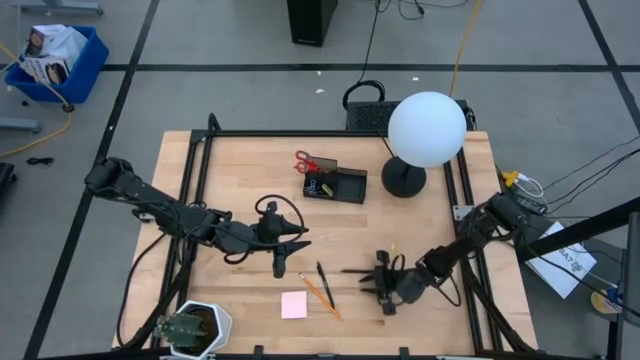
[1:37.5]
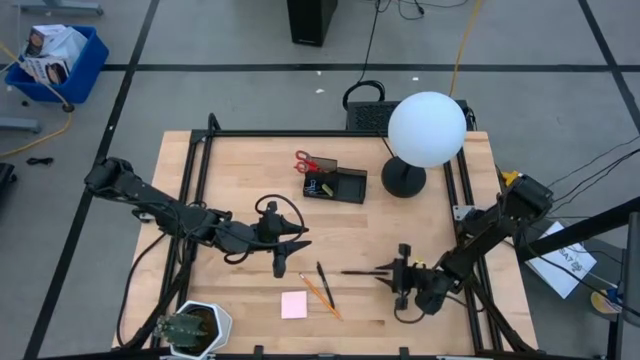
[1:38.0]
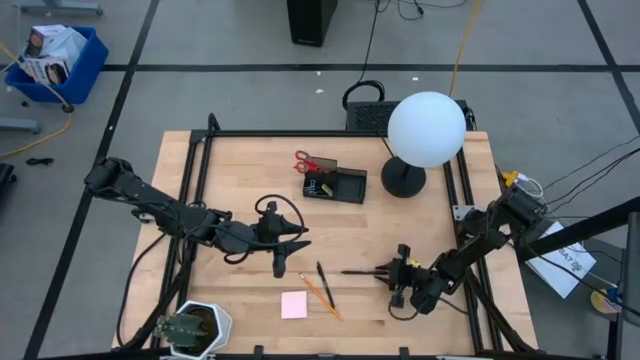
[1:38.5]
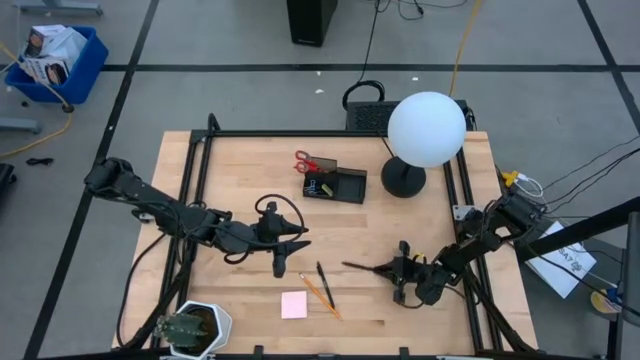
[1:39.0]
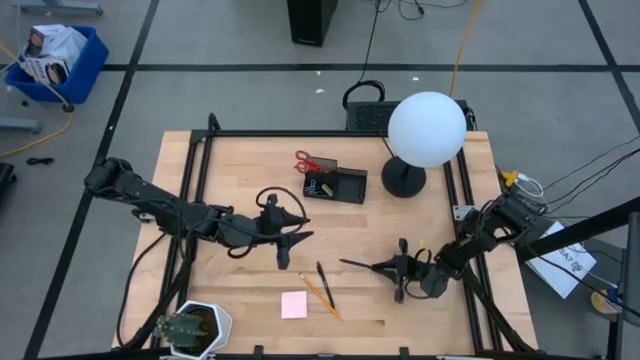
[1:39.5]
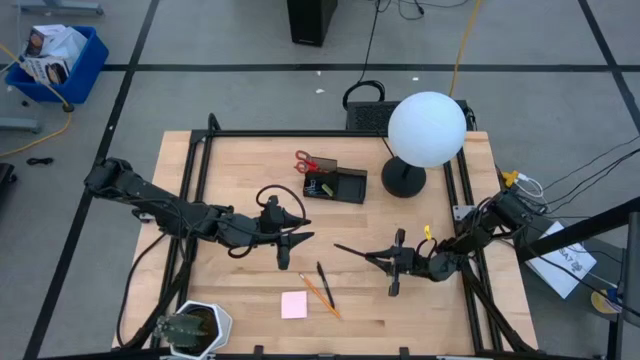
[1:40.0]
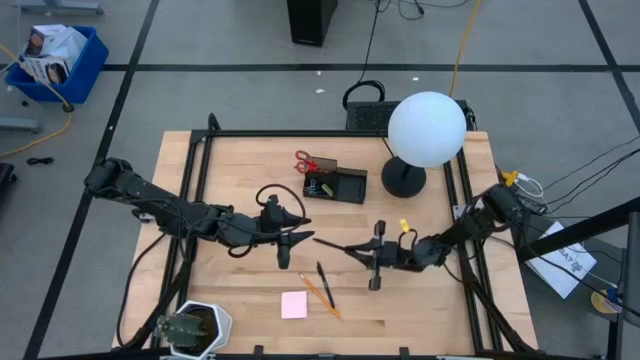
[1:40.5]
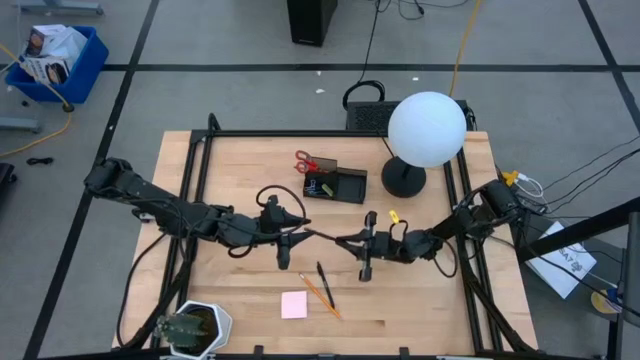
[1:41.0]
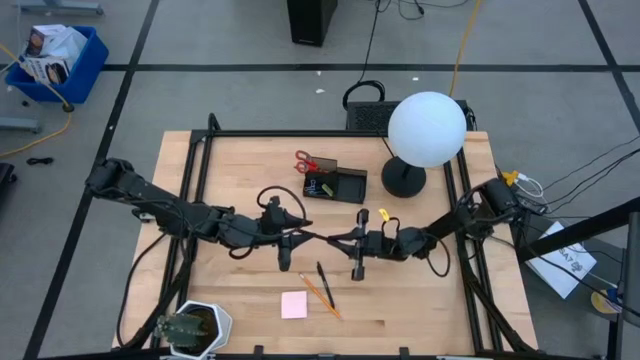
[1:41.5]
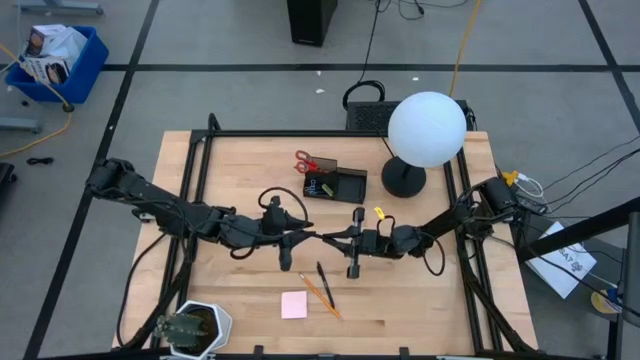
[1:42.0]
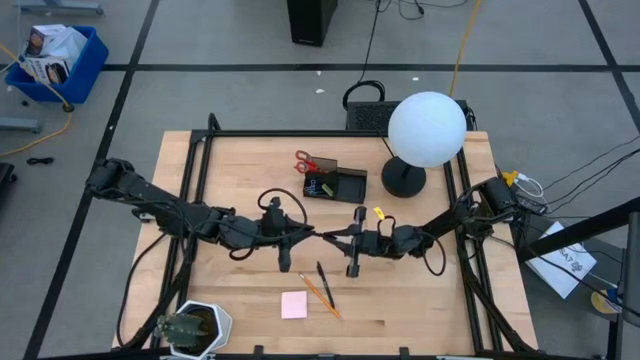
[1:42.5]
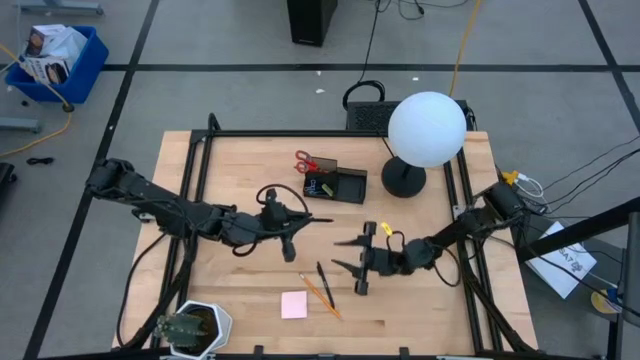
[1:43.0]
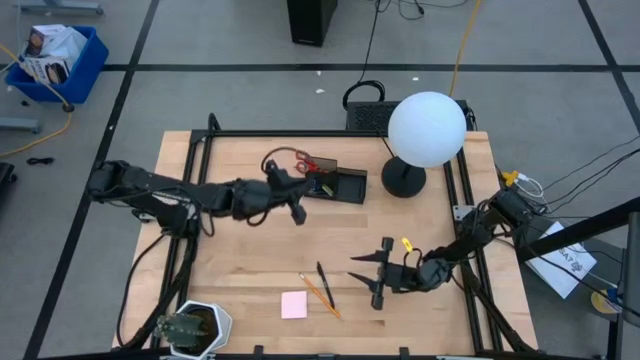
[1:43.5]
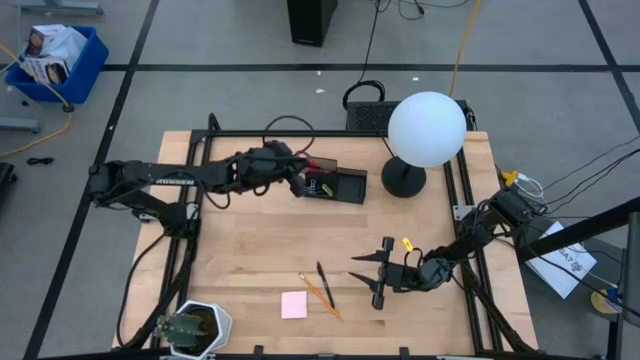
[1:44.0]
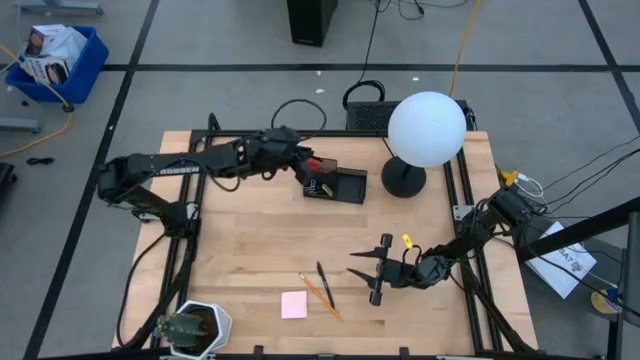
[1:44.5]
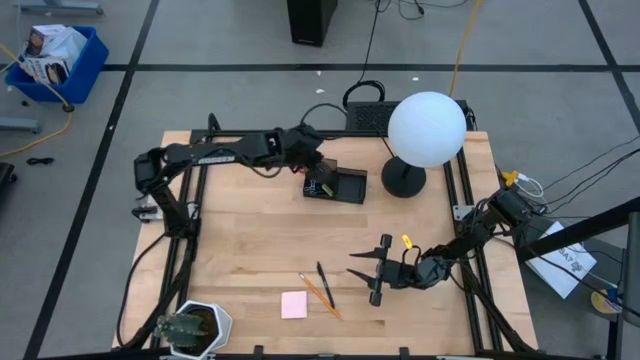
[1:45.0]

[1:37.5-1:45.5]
Task: Pick and place office supplies into organizer
Put the right black pen into the black desk organizer

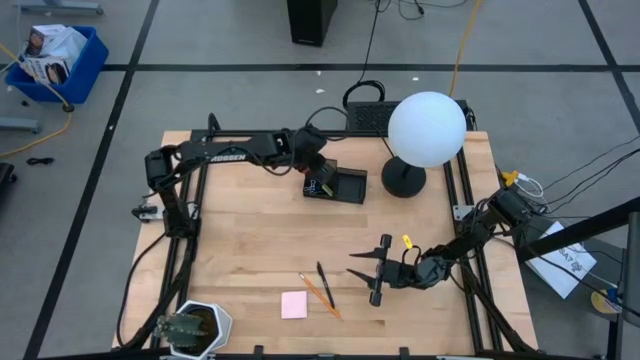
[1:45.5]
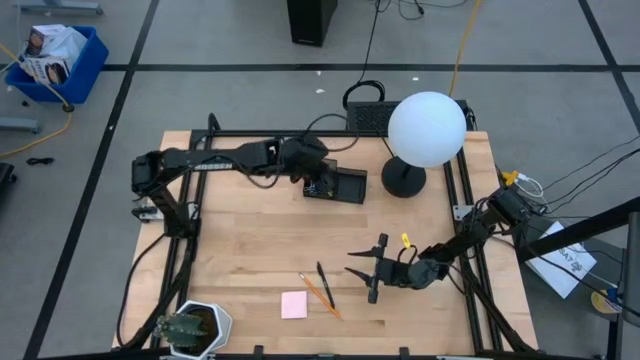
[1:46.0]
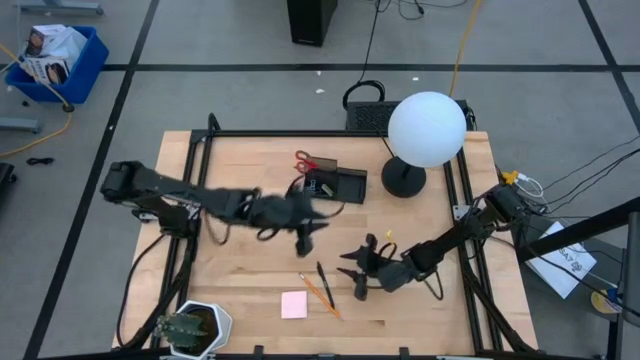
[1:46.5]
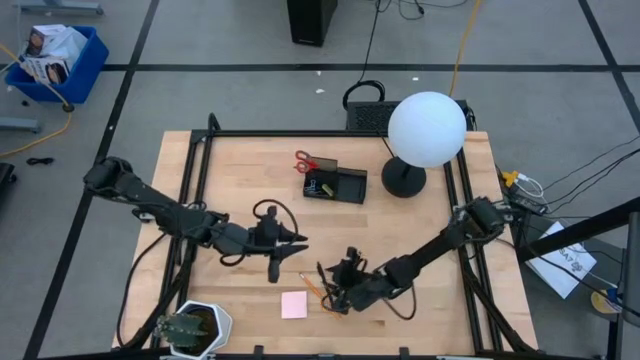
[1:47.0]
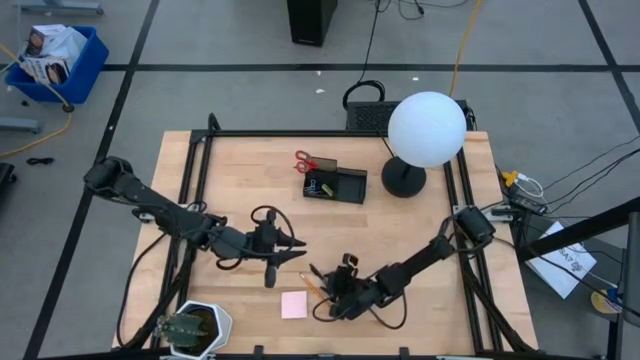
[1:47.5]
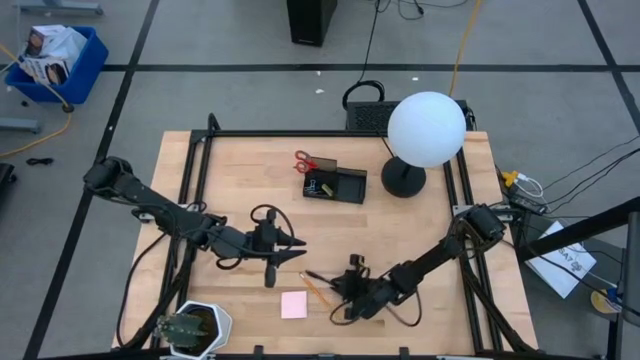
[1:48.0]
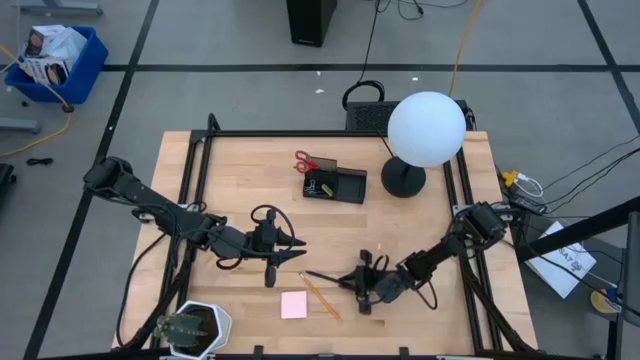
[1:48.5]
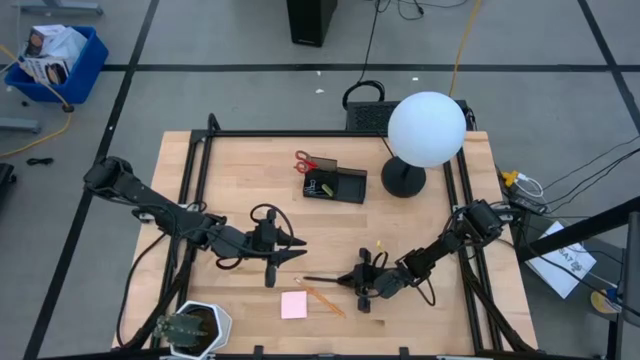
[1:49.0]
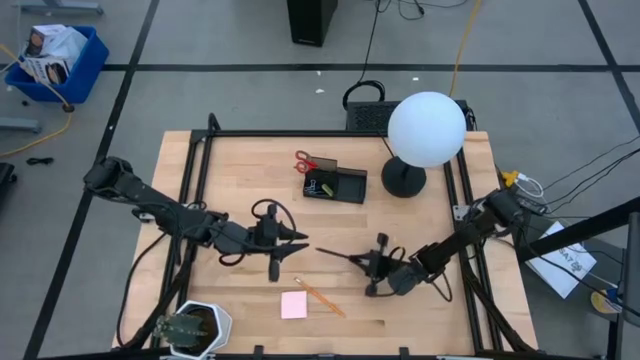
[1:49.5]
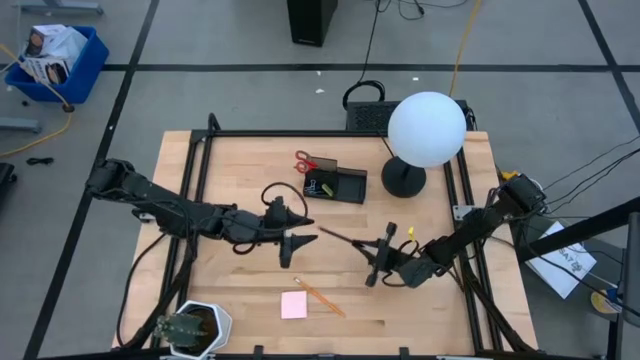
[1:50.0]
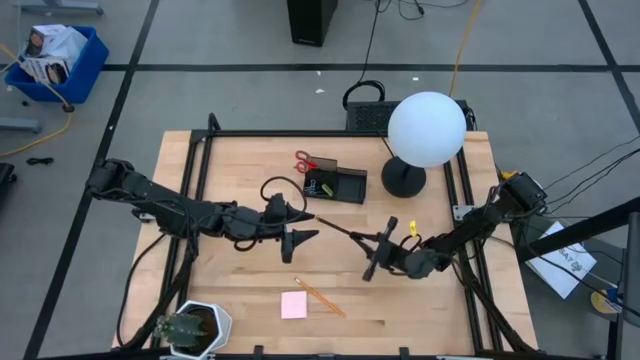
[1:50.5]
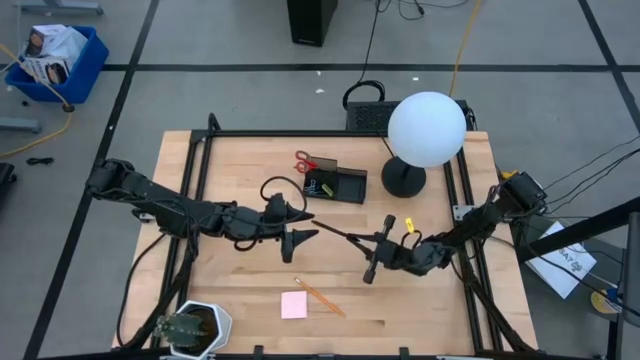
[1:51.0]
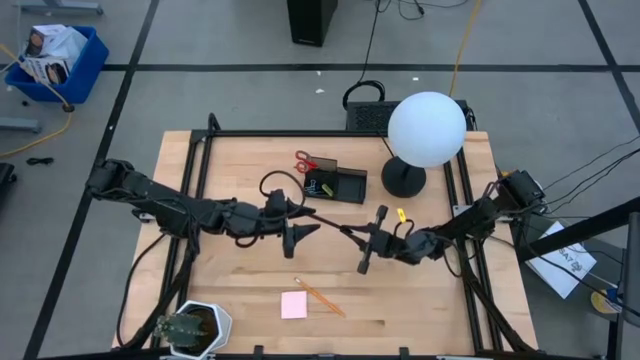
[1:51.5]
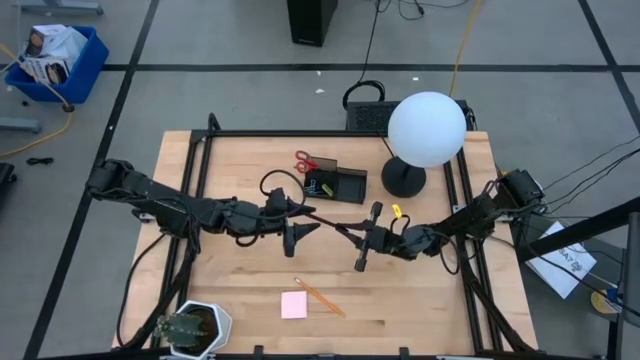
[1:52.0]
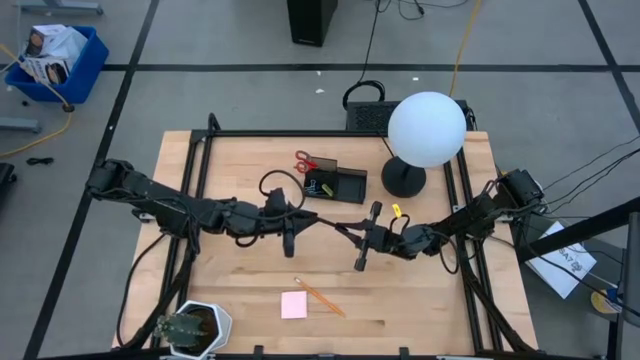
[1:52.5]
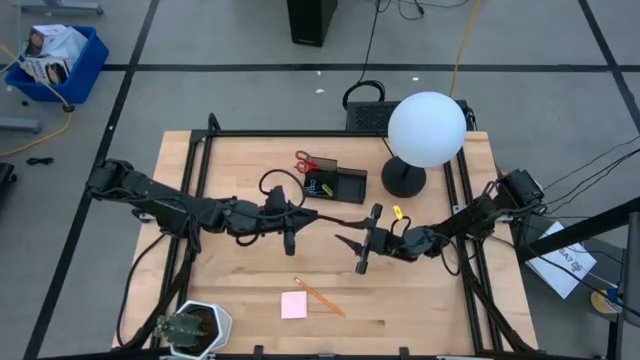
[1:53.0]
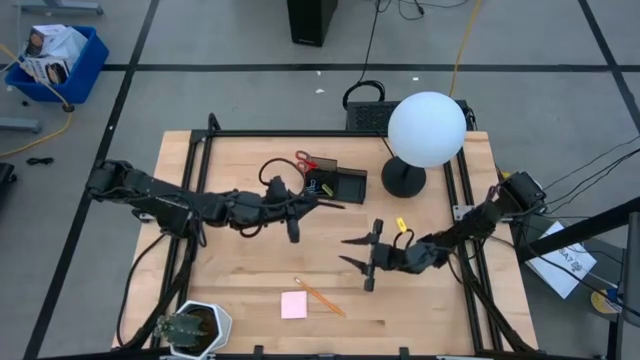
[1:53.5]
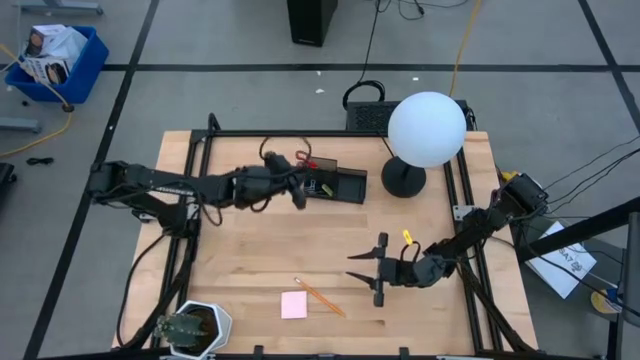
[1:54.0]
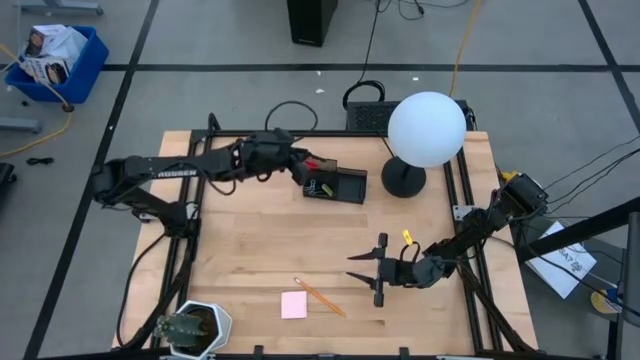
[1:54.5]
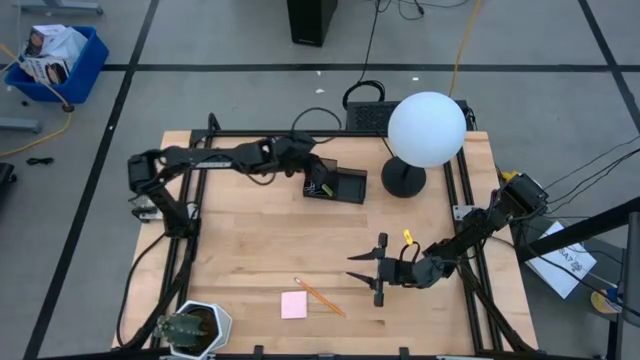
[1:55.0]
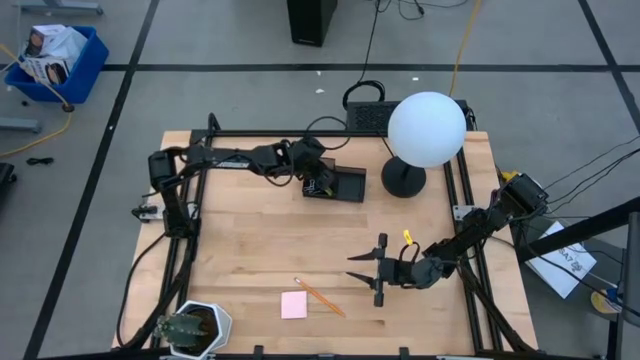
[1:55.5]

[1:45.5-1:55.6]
Put the black pen into the black desk organizer

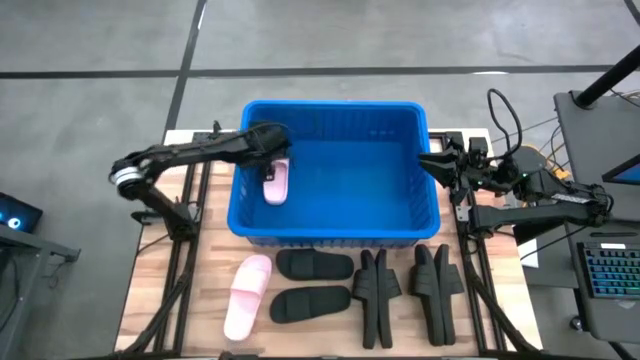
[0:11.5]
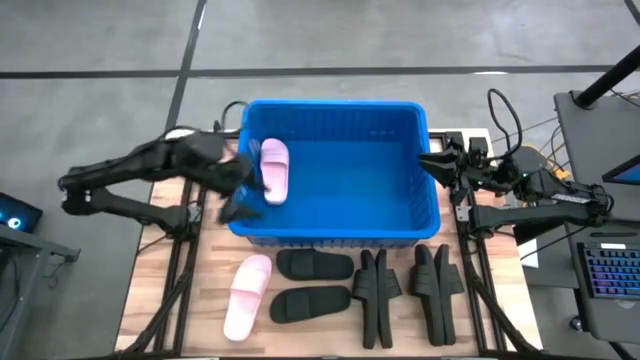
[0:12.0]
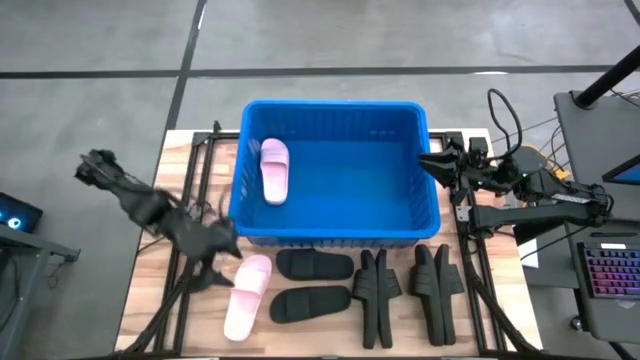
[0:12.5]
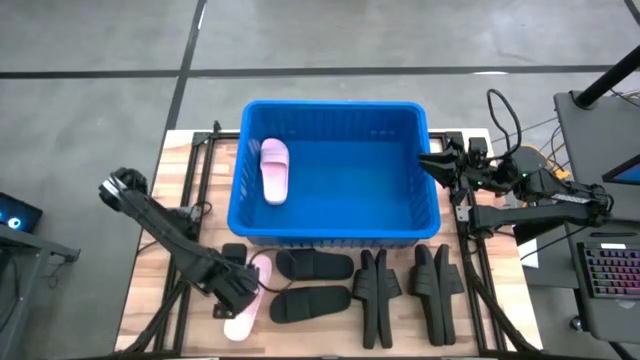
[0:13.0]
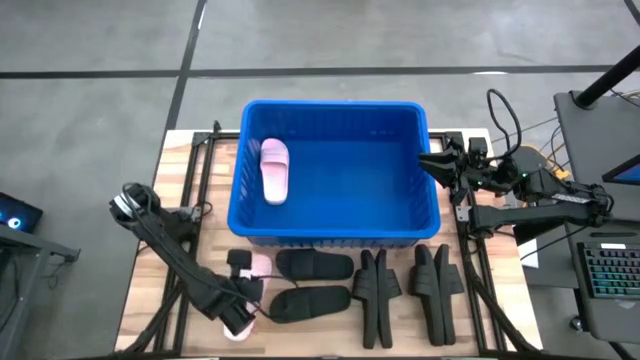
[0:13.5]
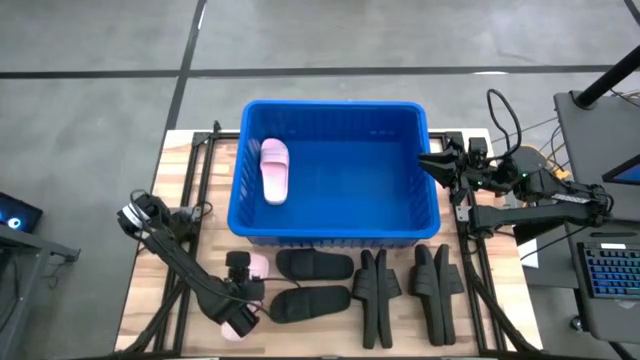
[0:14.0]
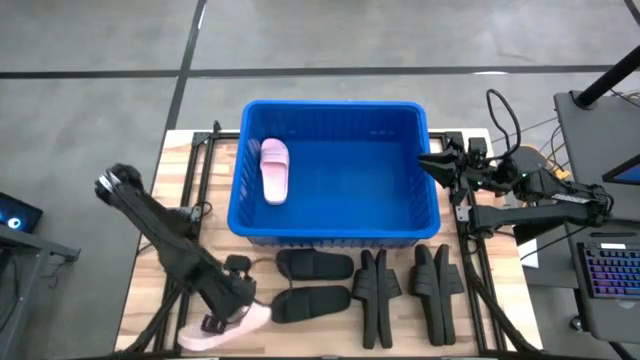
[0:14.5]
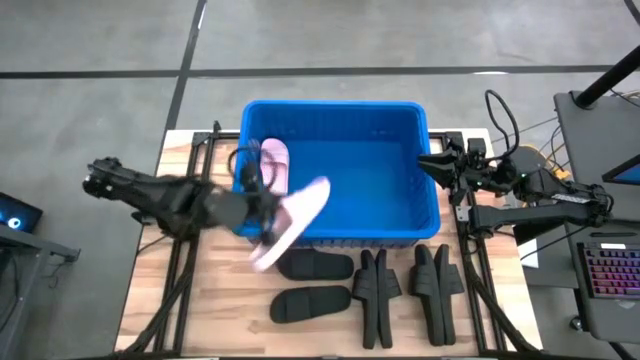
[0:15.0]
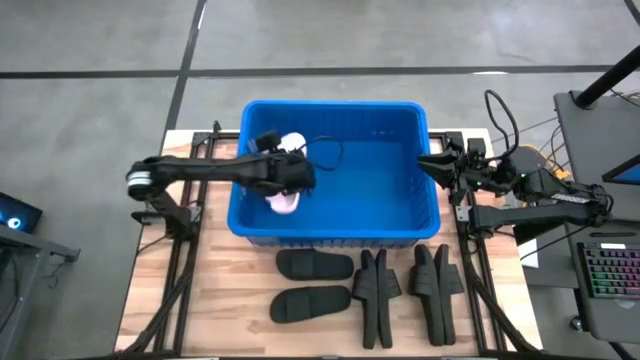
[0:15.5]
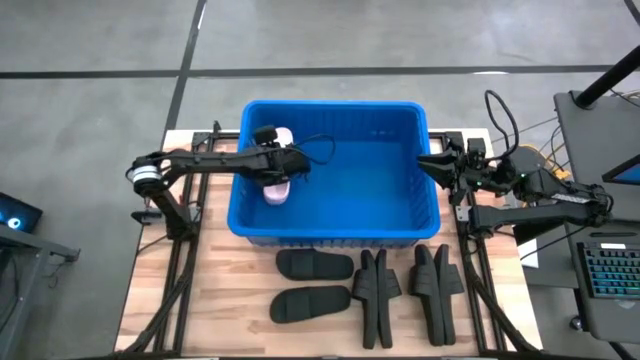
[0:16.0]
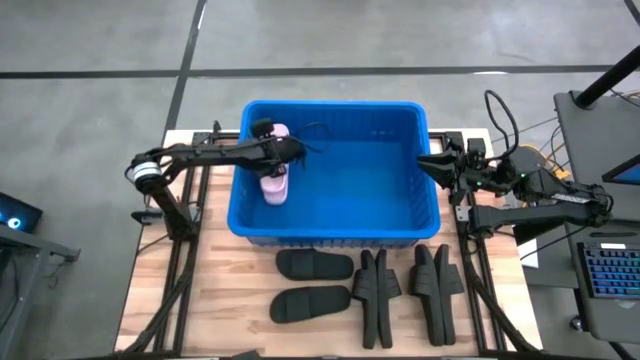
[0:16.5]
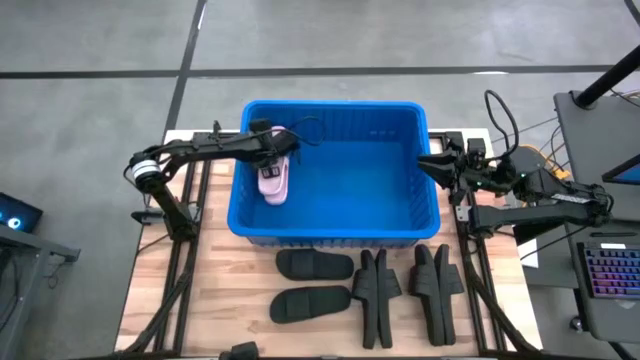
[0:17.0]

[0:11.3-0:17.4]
Task: Pick and place slides into bin
Put the pink slipper into the blue bin
